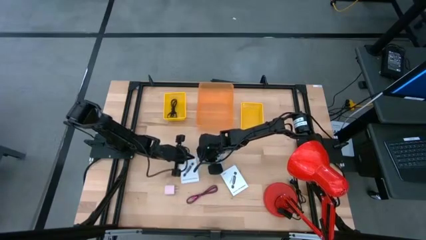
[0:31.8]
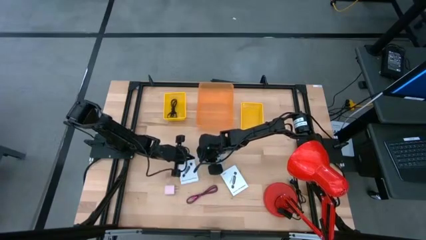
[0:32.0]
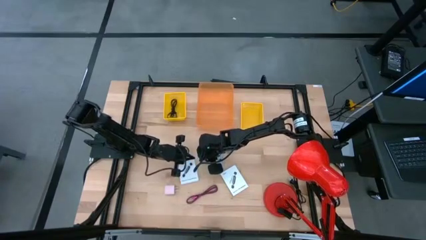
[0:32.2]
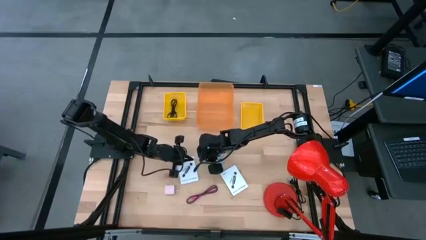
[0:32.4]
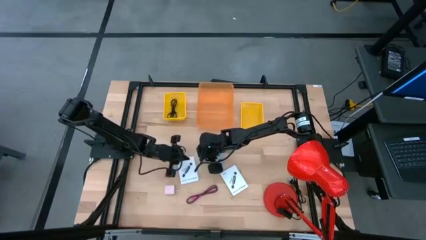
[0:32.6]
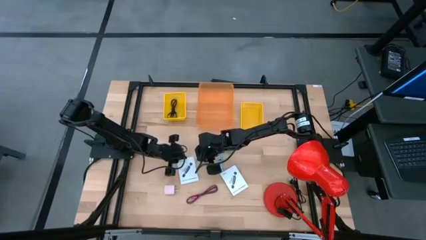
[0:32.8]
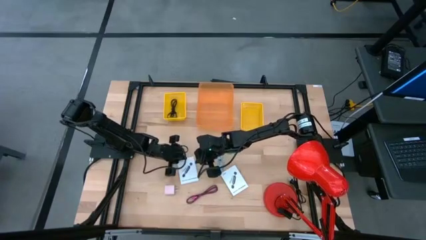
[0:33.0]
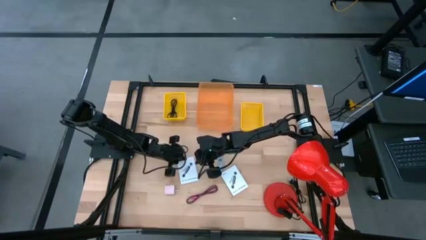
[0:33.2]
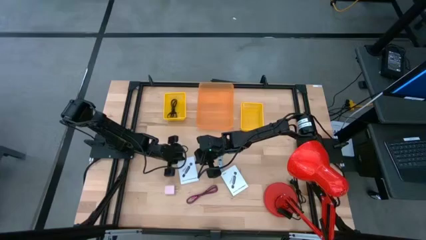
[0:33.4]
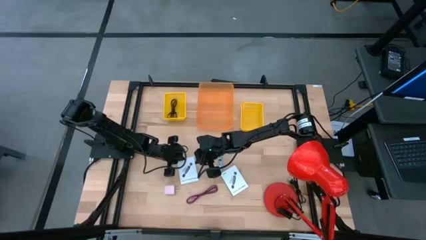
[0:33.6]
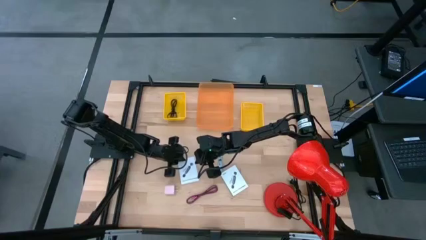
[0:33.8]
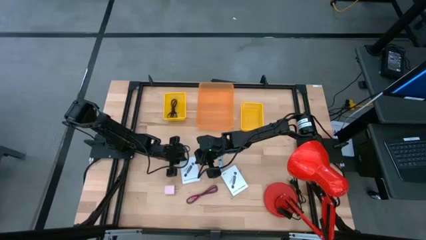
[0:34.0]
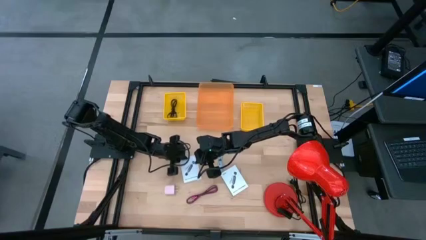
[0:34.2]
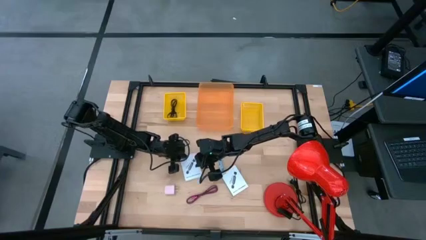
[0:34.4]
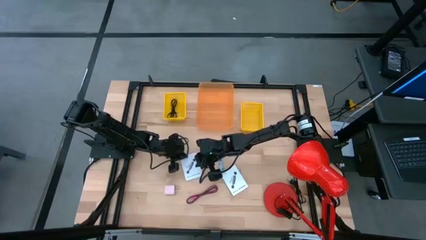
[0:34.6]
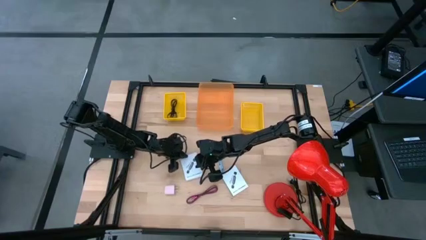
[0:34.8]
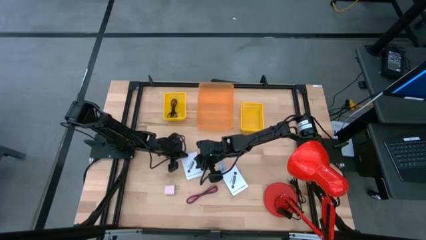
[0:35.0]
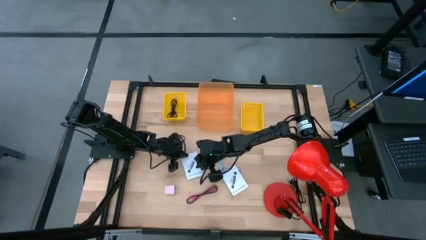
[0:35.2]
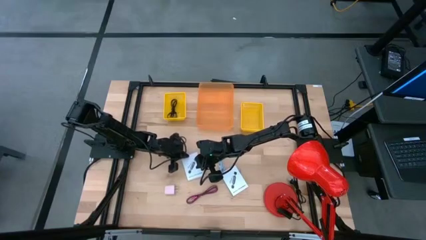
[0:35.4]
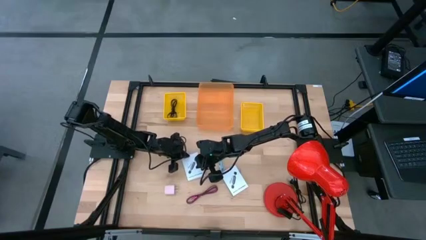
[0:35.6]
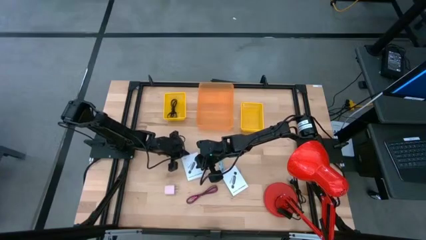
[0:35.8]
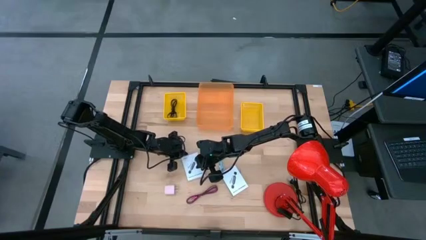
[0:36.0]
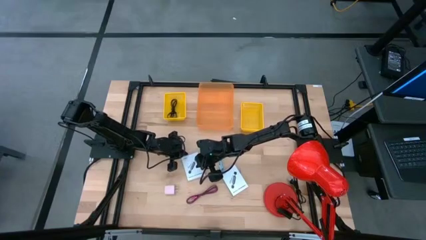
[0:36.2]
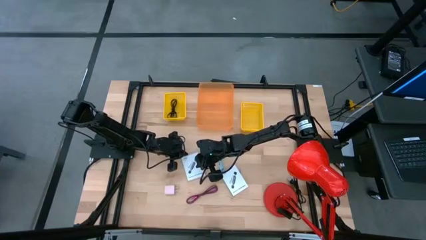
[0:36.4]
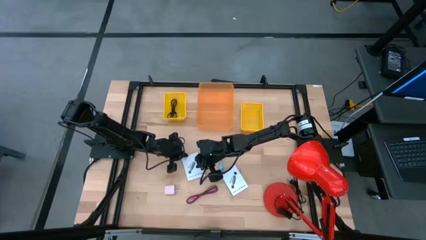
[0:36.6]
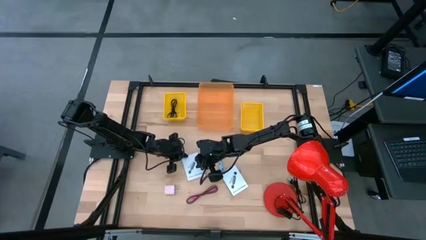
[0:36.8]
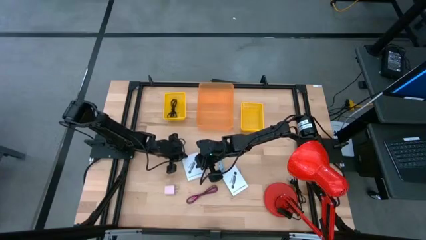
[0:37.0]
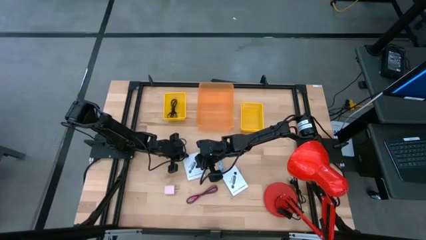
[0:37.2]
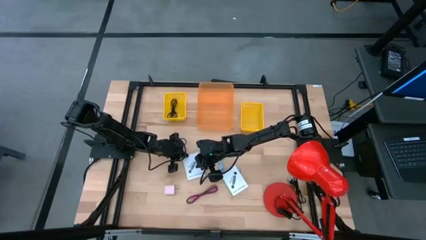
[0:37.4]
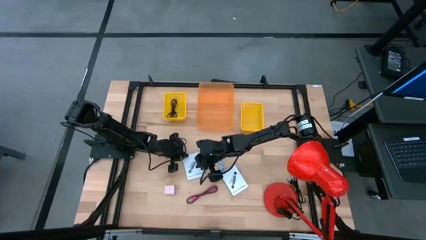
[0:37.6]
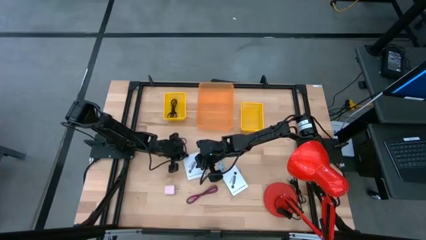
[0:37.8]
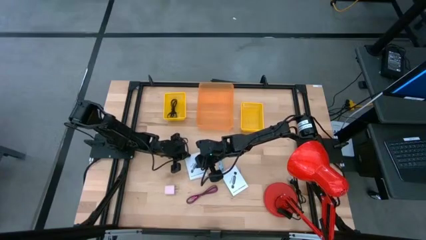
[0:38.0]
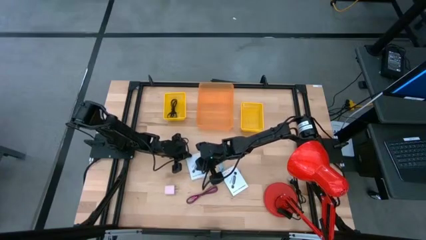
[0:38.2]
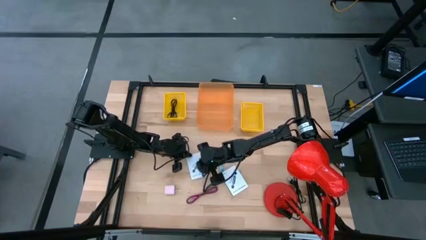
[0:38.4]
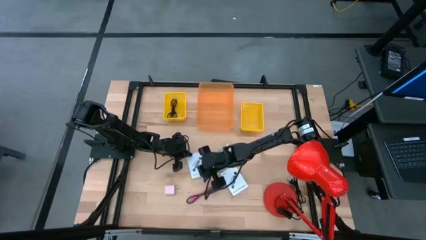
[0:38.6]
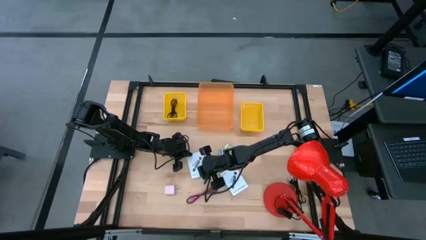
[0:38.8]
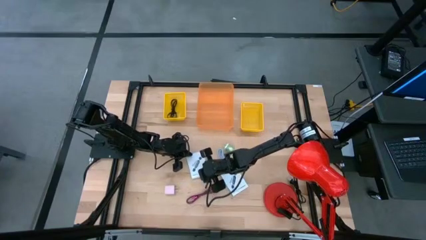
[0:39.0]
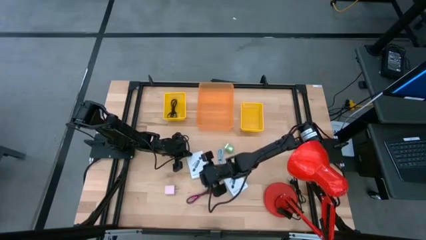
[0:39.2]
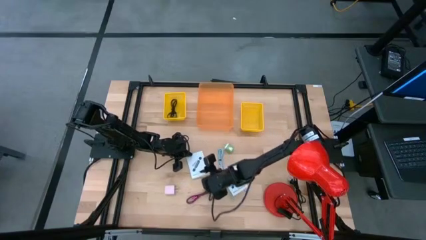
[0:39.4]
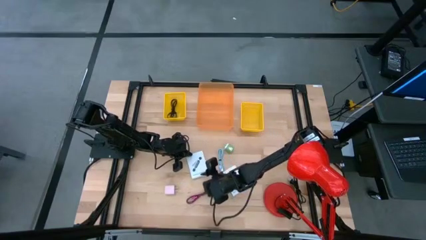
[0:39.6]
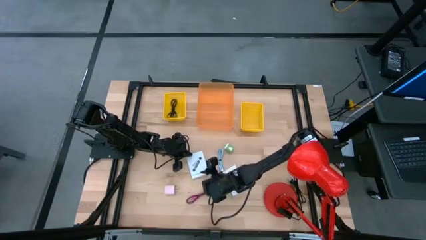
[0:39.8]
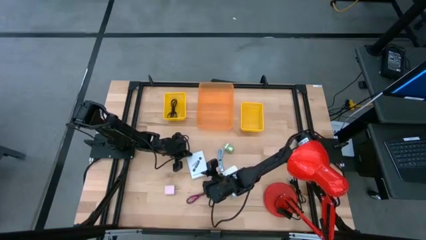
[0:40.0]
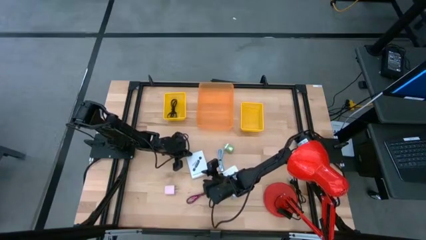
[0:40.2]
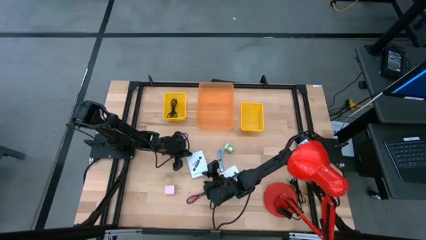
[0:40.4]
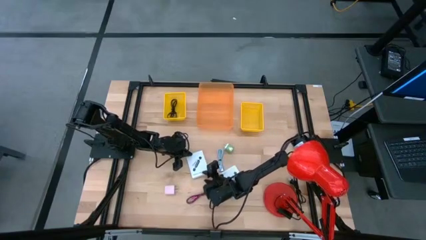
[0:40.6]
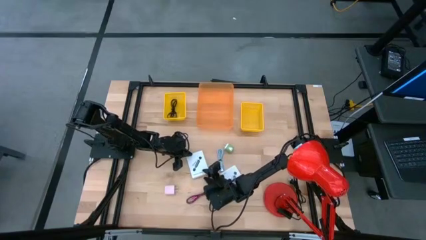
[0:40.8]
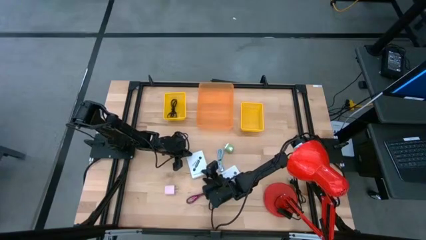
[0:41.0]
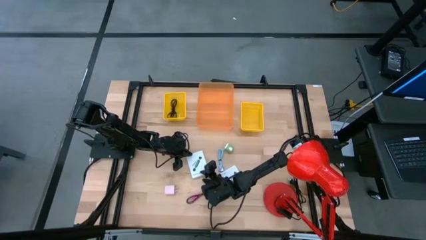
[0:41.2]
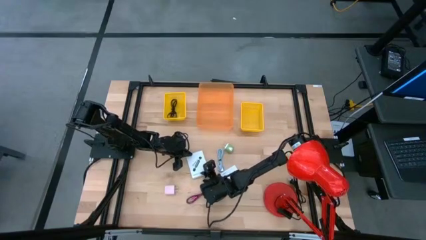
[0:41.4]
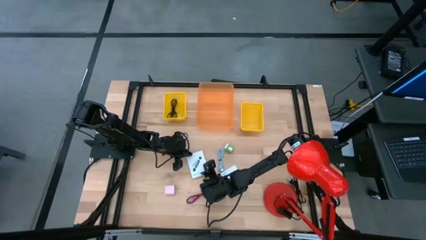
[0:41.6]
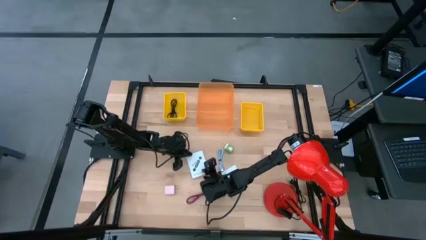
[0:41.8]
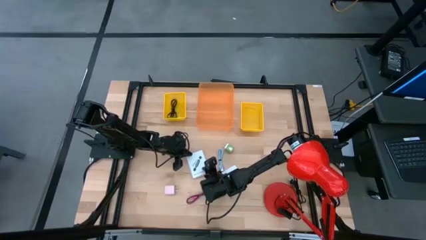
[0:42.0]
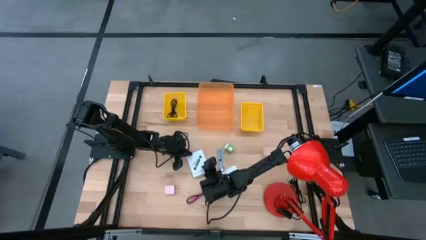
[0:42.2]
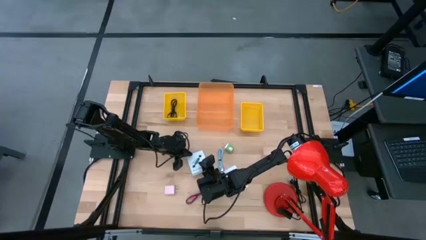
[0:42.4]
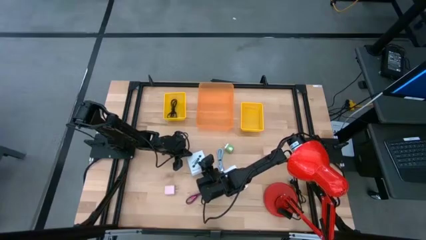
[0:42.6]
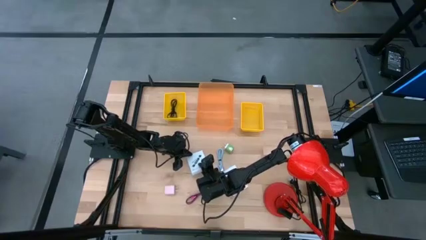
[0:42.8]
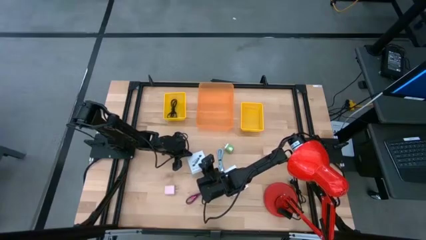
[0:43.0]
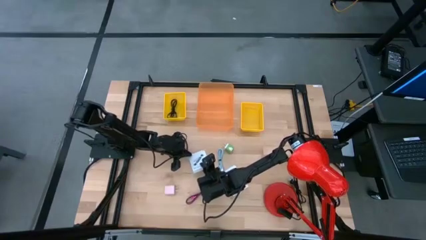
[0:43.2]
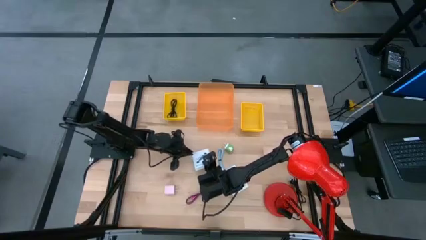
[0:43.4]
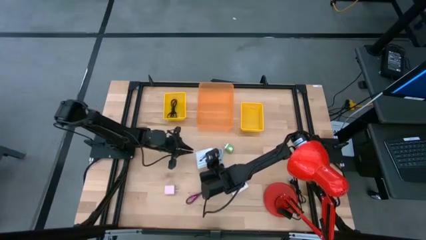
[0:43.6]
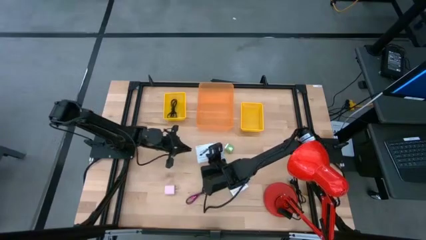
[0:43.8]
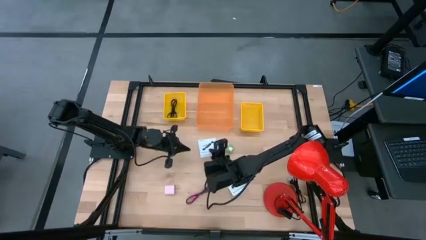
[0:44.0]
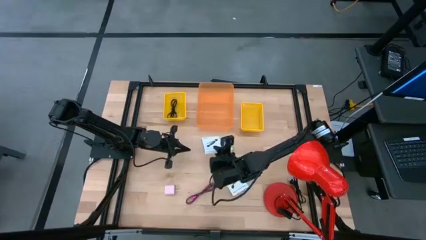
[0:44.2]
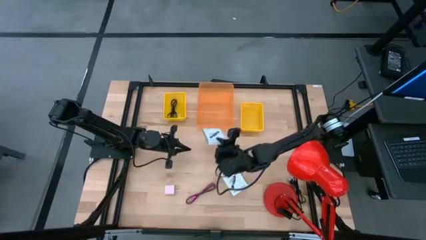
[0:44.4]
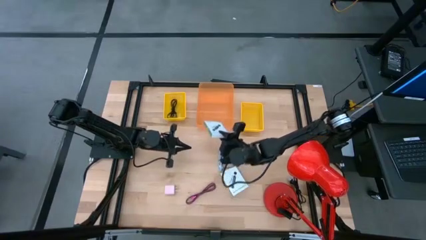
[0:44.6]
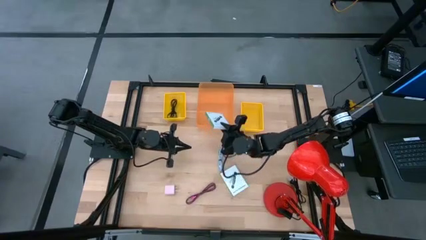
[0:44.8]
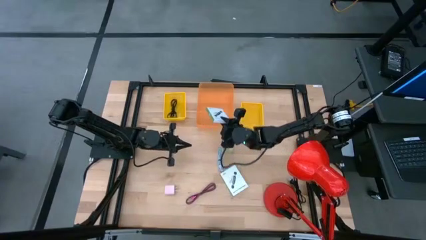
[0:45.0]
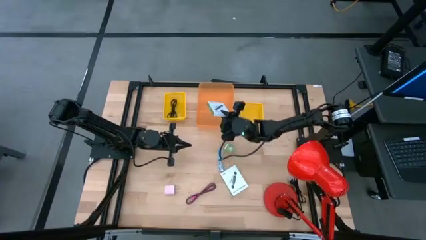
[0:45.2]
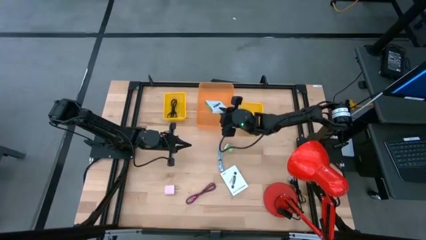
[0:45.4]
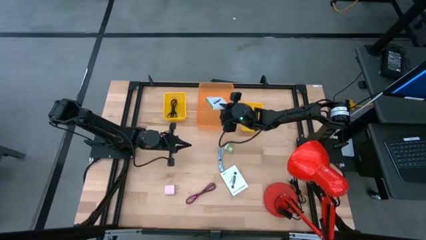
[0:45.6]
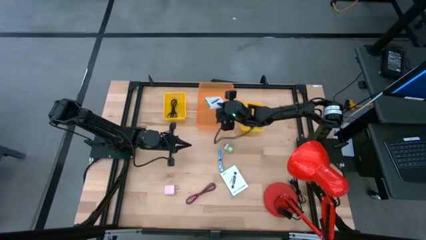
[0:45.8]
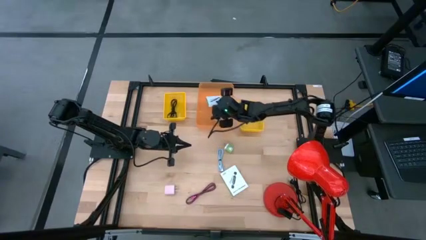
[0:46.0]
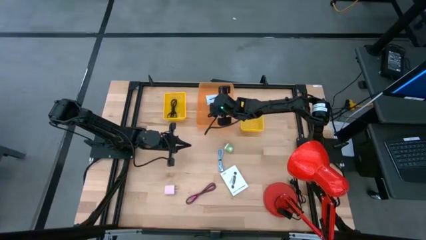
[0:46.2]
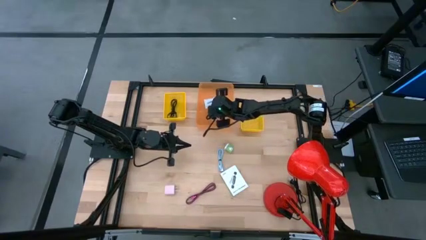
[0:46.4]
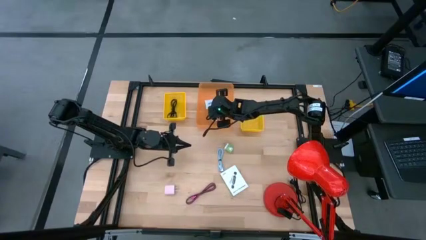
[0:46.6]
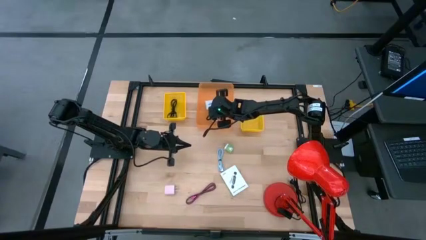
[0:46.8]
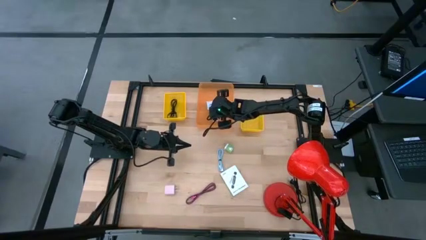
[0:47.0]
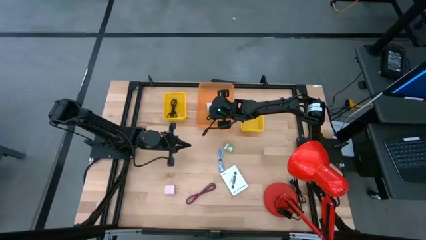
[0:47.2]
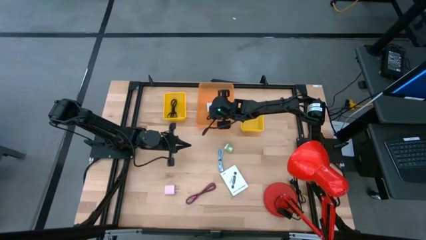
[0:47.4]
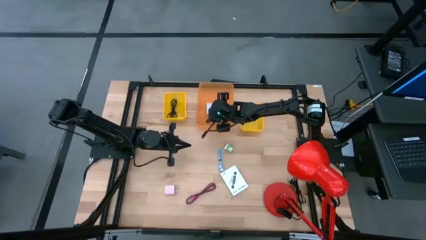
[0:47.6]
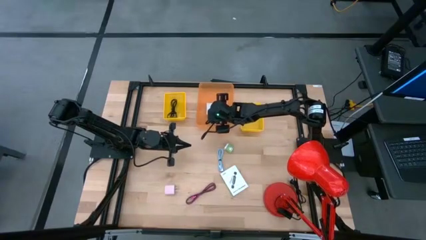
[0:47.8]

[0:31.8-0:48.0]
Task: Pick and place items into bin
Put the left card reader box into the orange bin
